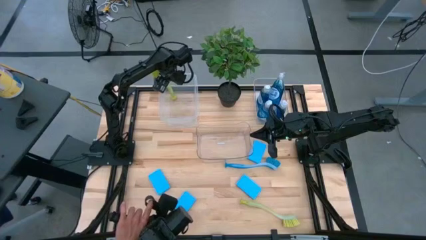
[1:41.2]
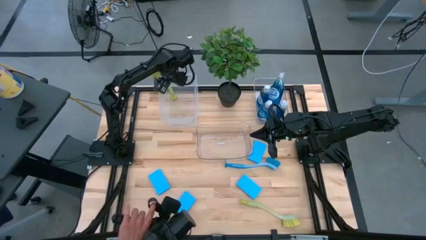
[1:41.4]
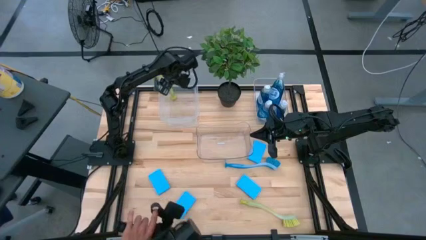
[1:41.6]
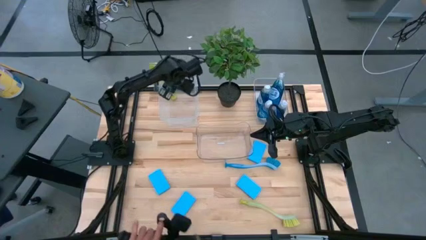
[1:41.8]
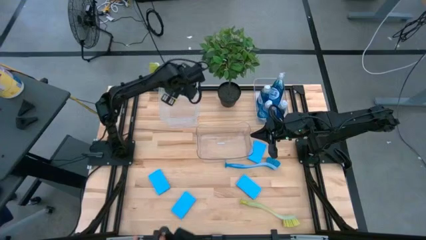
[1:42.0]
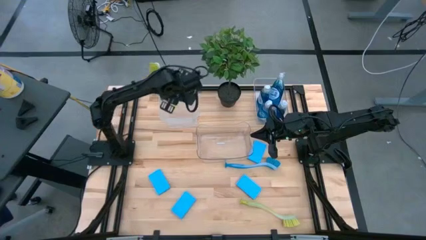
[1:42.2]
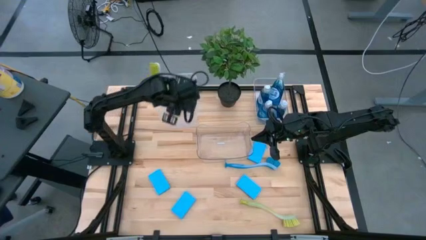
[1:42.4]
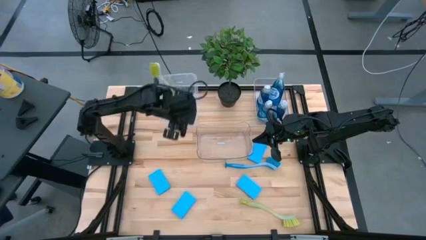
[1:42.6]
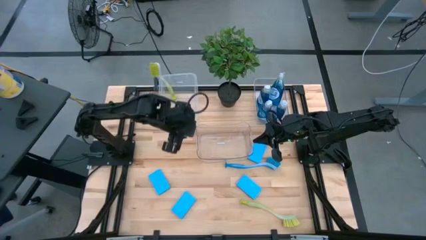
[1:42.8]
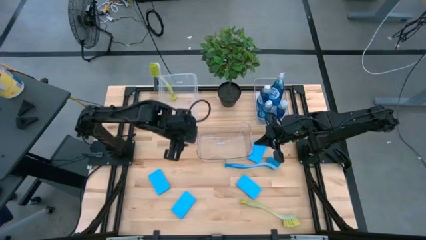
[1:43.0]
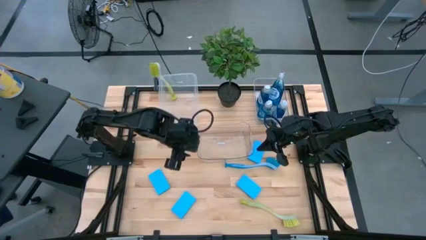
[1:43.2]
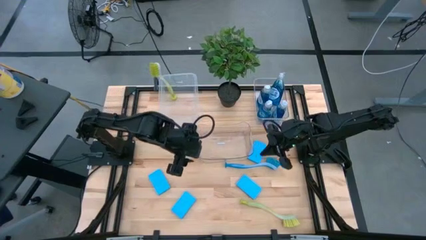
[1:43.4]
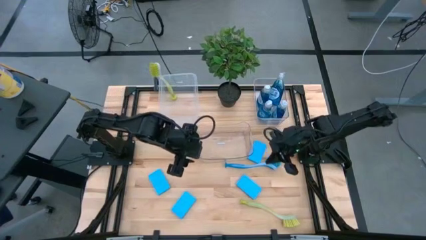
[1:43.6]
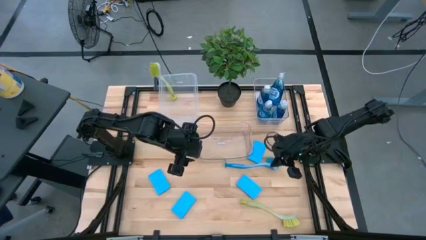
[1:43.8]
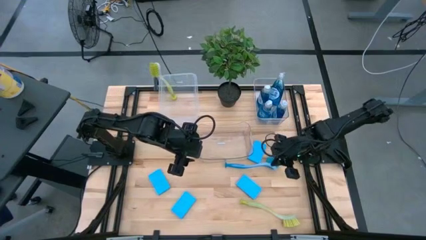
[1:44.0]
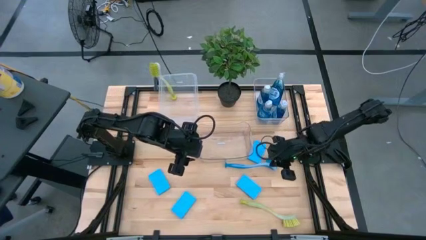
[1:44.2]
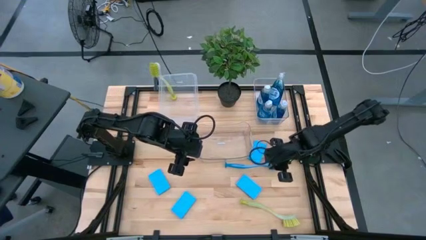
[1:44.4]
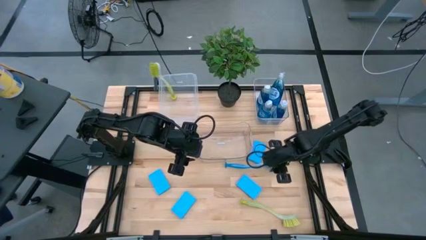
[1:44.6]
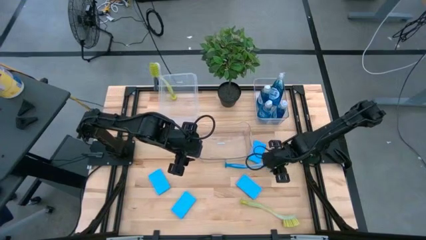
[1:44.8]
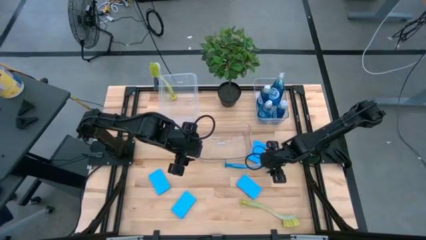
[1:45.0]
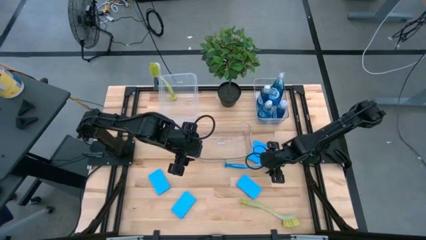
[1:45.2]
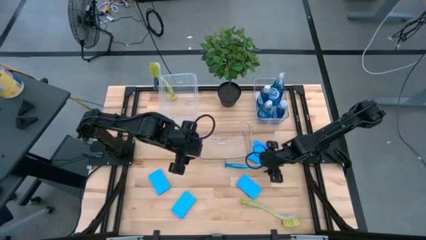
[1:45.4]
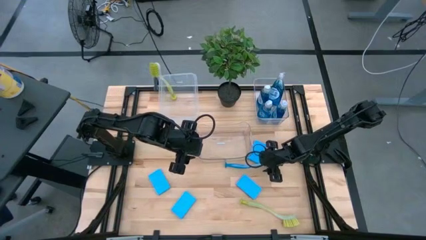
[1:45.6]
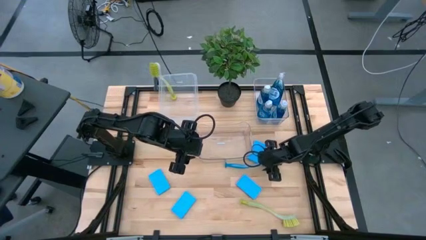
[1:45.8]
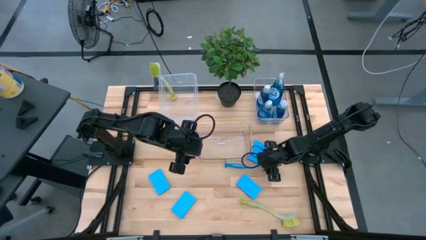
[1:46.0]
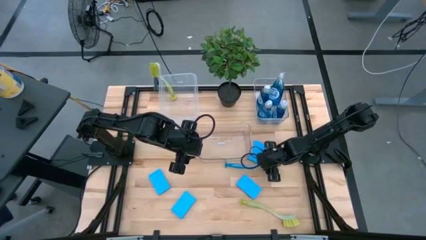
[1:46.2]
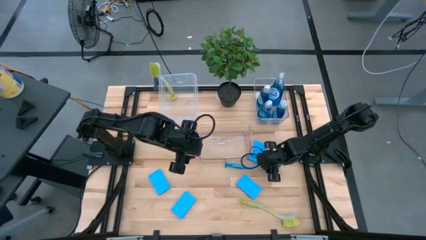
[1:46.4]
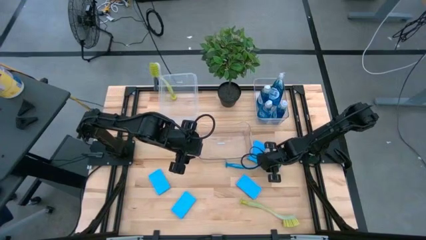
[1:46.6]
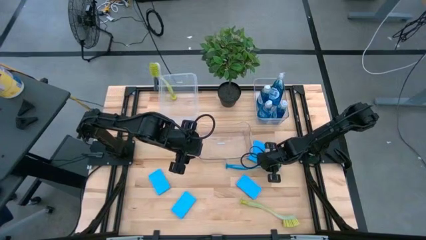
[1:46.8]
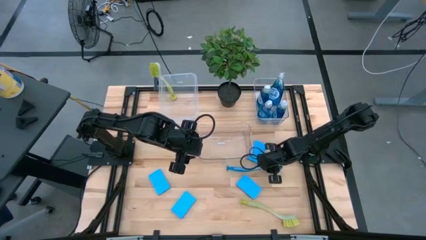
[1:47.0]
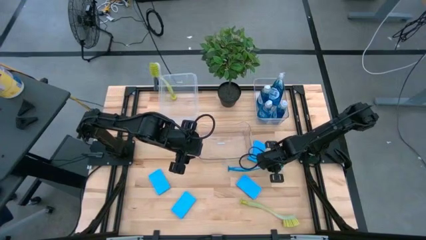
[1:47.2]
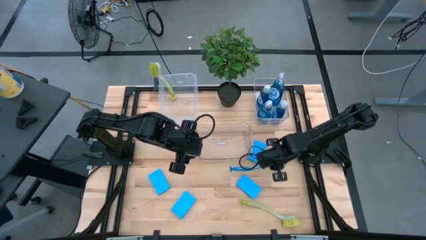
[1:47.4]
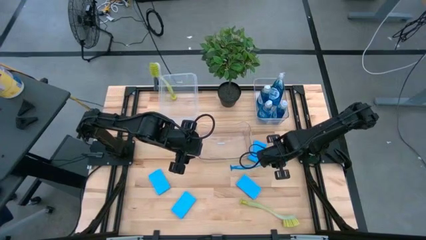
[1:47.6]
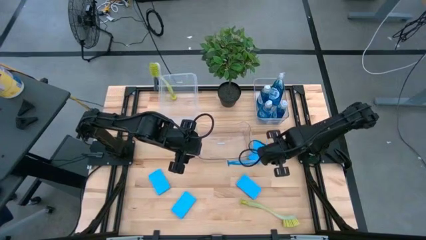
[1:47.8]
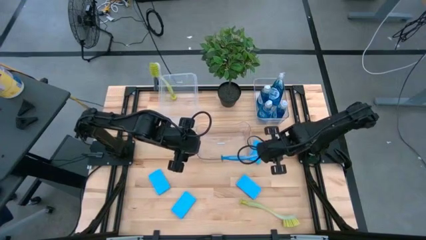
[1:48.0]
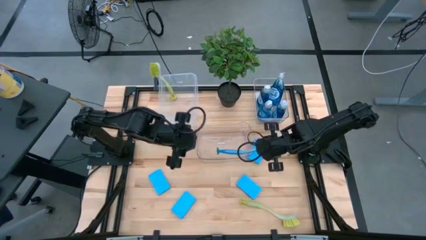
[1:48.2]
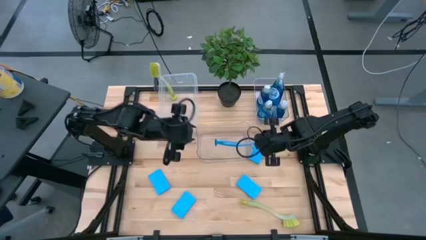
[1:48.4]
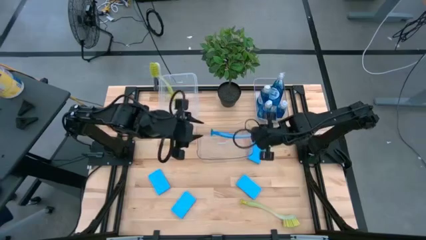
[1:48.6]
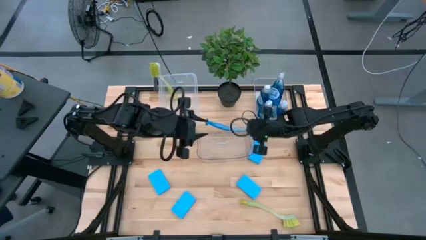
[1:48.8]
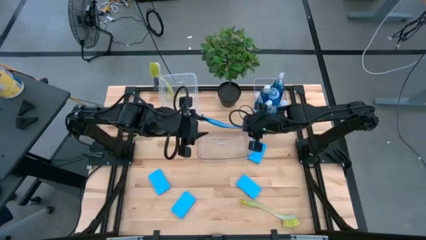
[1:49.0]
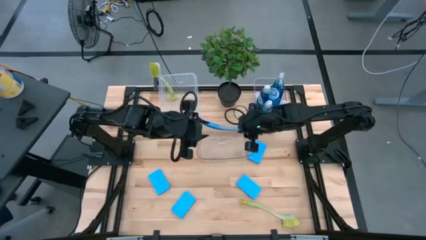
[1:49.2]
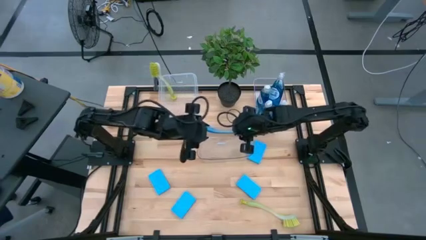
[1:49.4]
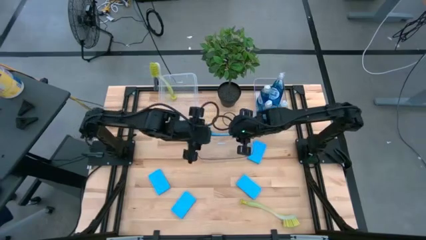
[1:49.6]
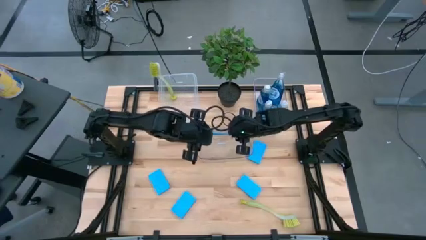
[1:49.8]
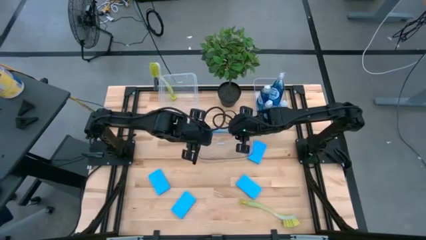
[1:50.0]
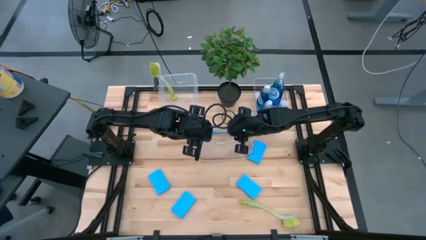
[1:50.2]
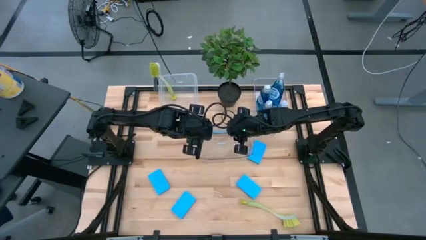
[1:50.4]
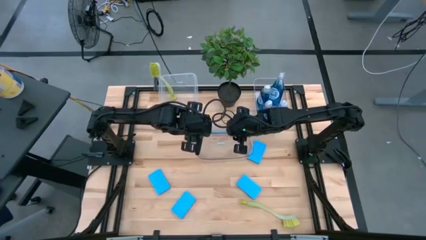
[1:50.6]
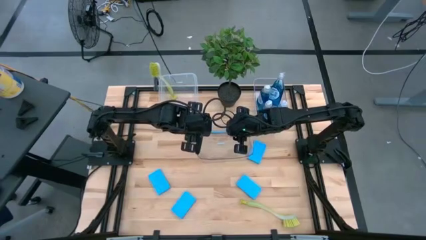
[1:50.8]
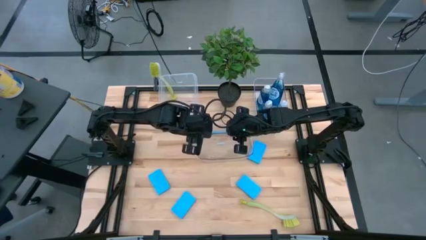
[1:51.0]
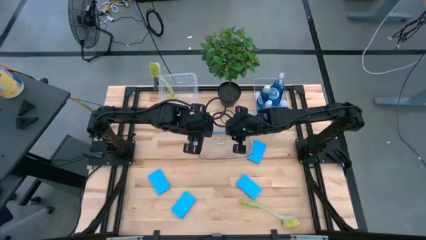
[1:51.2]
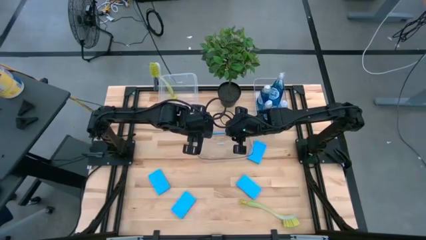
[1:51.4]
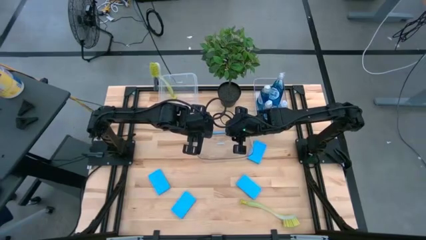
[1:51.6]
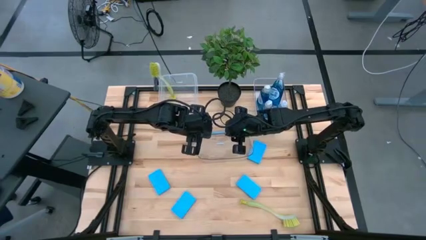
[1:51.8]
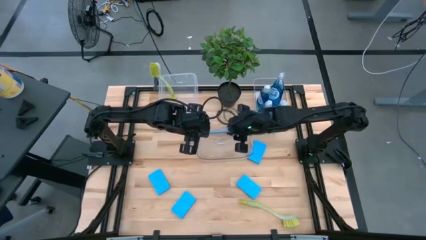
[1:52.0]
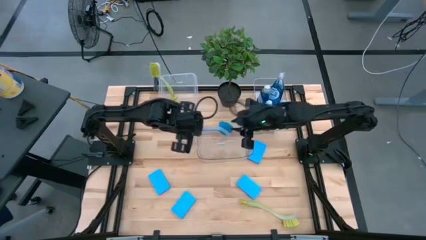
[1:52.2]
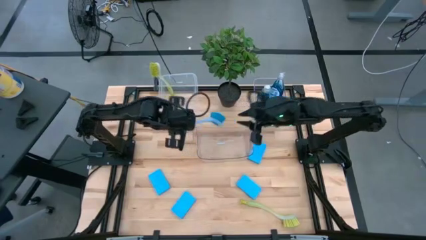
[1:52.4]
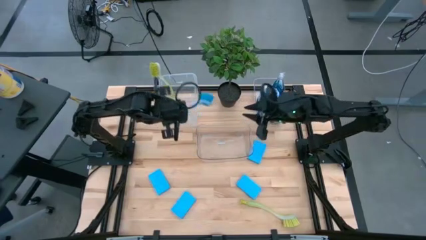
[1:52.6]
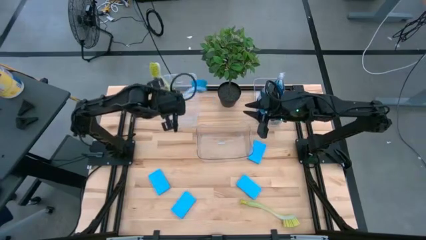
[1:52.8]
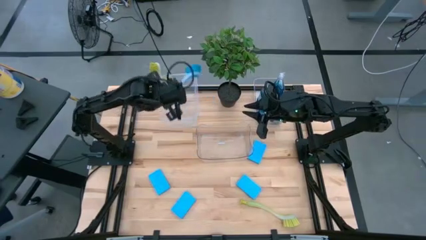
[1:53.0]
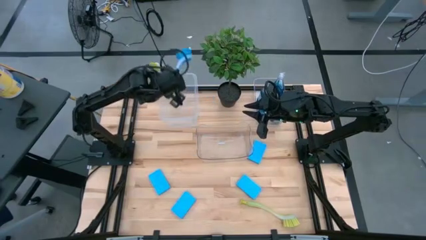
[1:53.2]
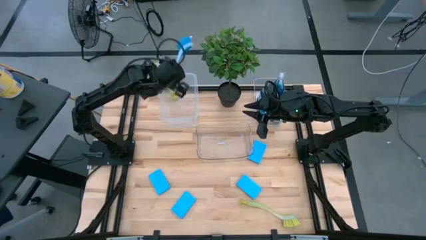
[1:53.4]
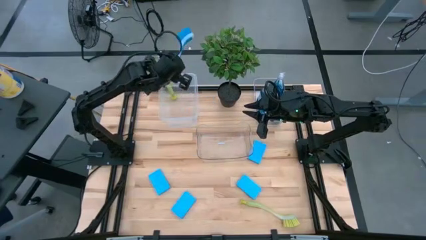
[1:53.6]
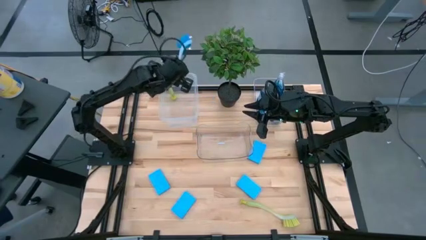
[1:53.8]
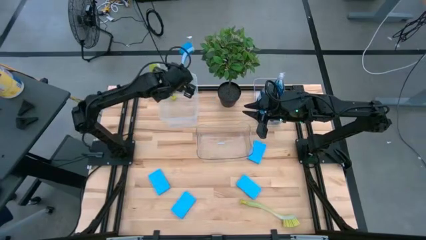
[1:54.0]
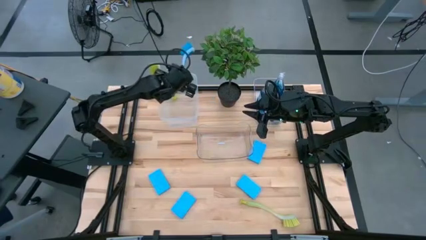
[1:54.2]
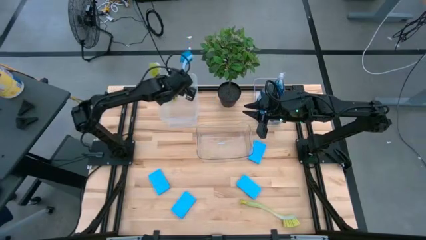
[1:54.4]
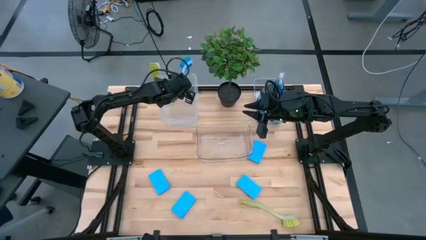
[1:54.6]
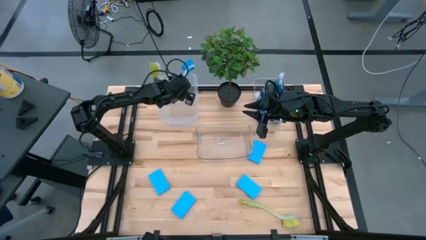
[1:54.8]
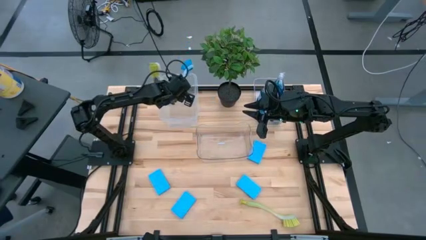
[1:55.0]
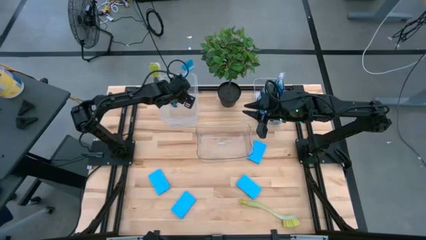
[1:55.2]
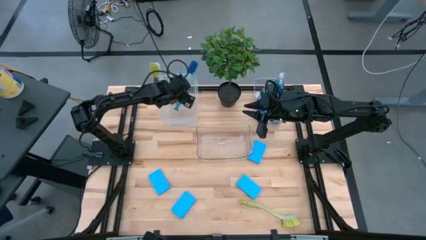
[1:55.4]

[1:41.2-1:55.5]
Task: Pick & Place Kitchen Sink Supplies
Put the blue dishwashing brush into the white bin

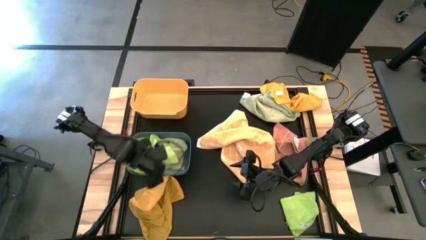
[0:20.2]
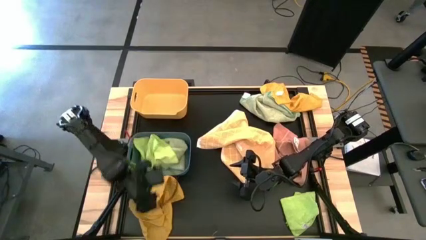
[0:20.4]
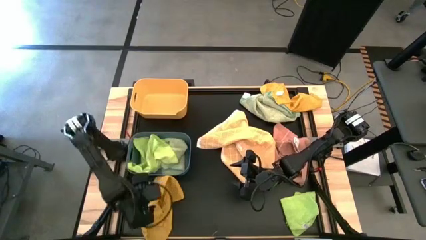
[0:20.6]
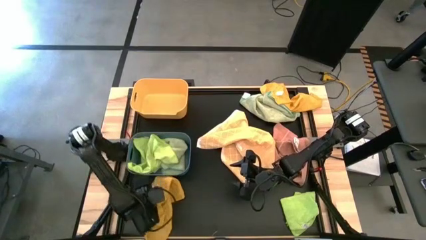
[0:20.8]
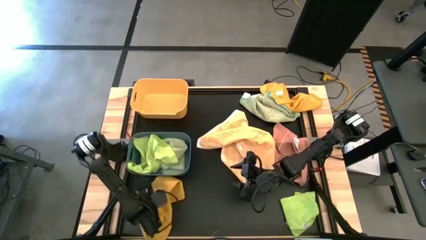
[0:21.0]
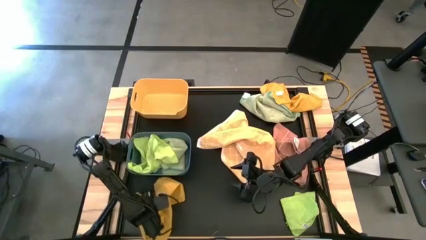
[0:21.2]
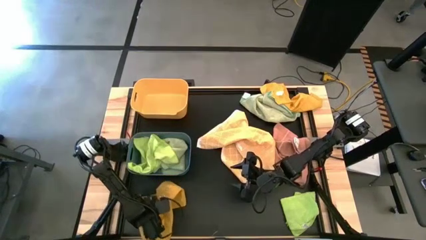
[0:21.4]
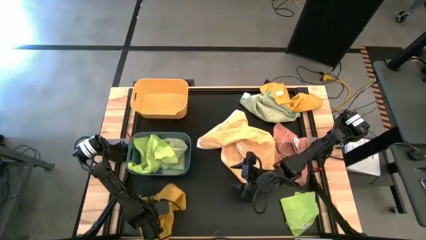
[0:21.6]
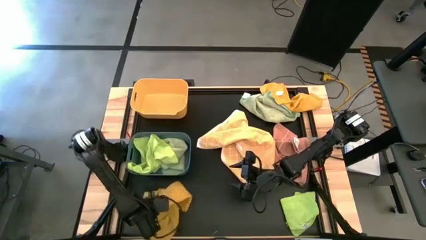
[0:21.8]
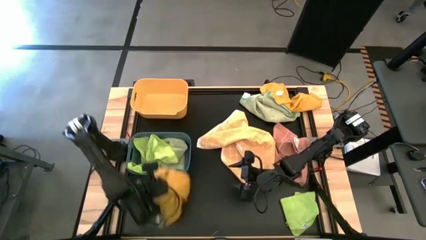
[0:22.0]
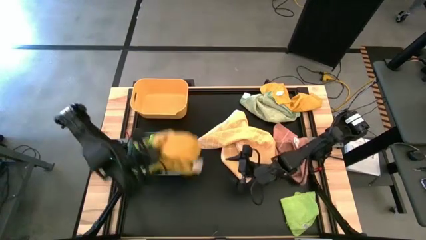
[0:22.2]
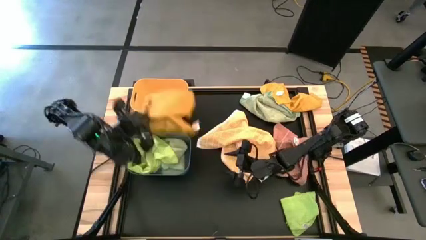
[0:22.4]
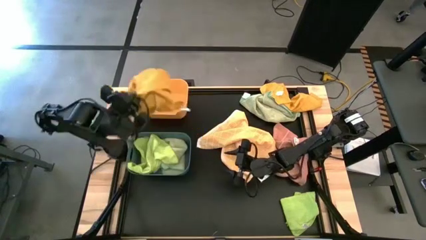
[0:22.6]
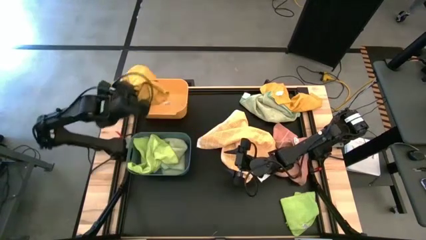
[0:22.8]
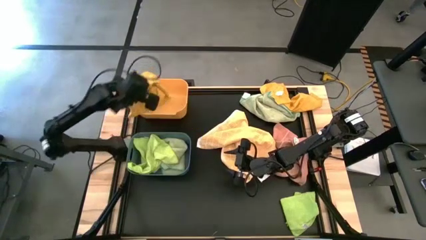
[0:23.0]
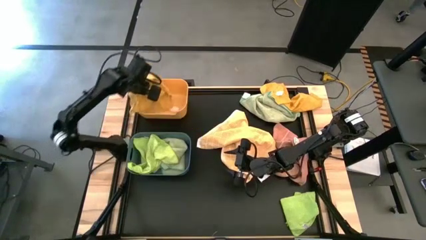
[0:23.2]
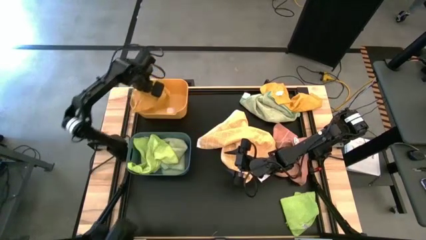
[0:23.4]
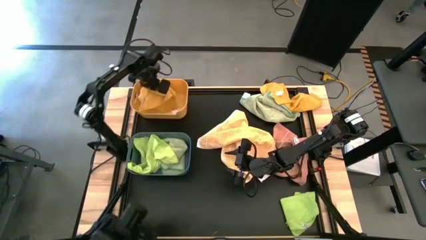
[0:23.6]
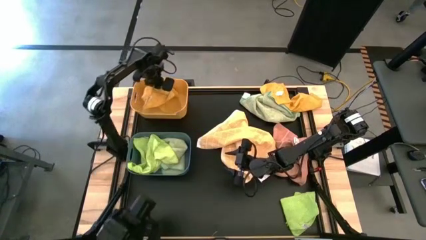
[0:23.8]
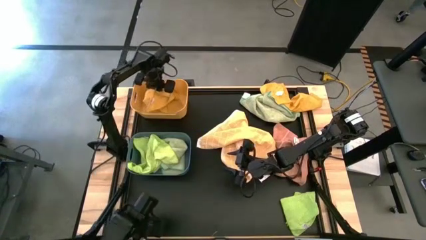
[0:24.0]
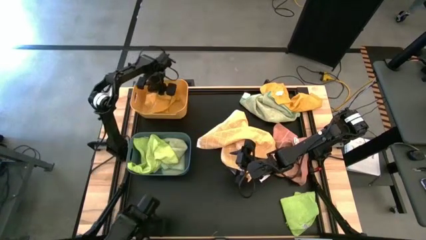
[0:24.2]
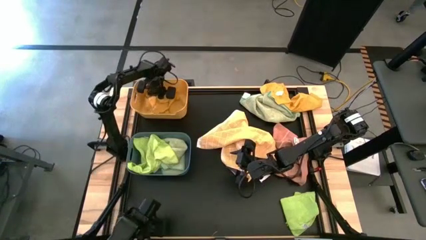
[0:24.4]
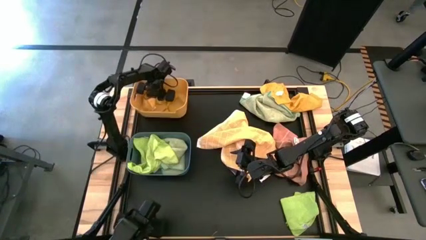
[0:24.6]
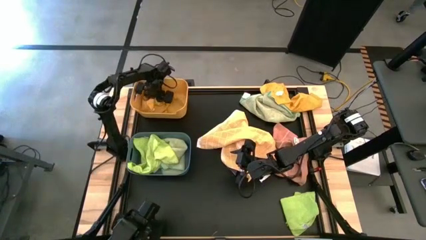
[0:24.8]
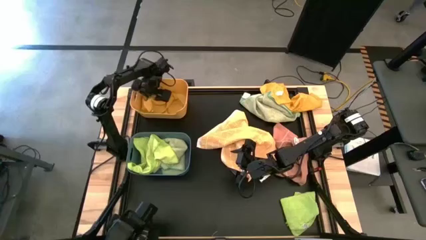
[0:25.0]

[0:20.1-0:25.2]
Task: Sort microfiber towel by color & place in baskets
Put the bottom yellow towel into the yellow bin
